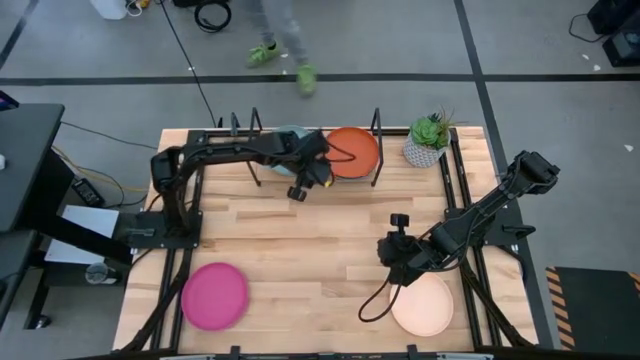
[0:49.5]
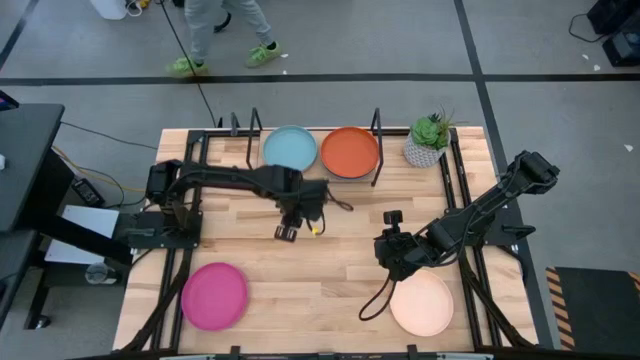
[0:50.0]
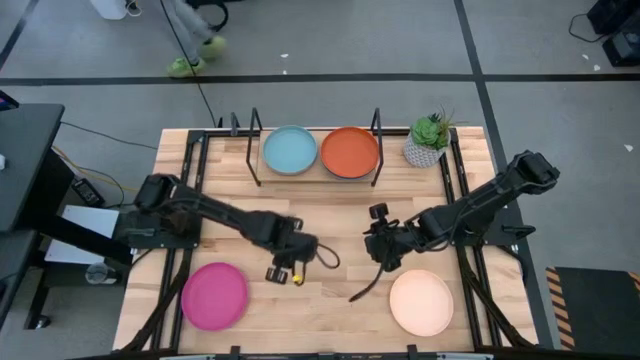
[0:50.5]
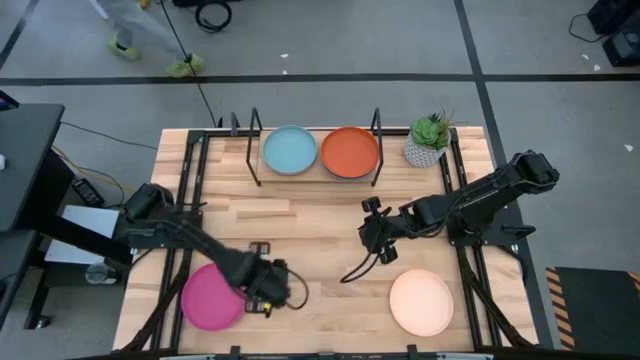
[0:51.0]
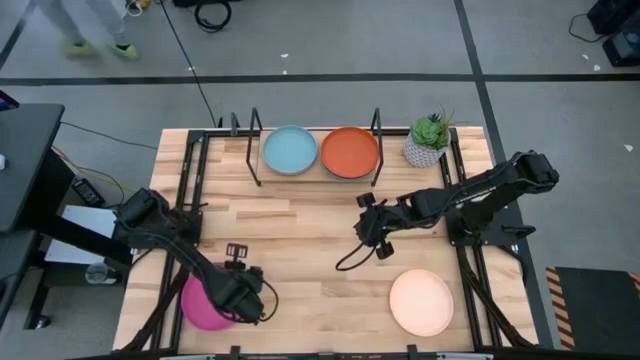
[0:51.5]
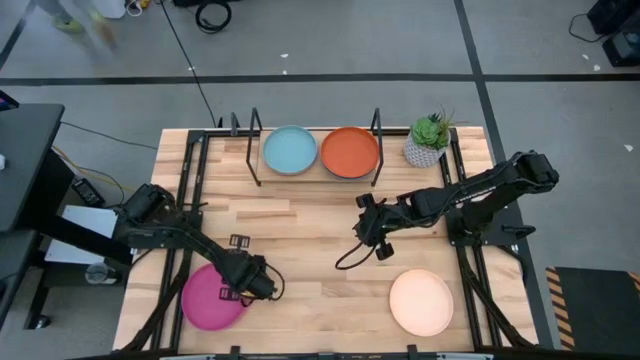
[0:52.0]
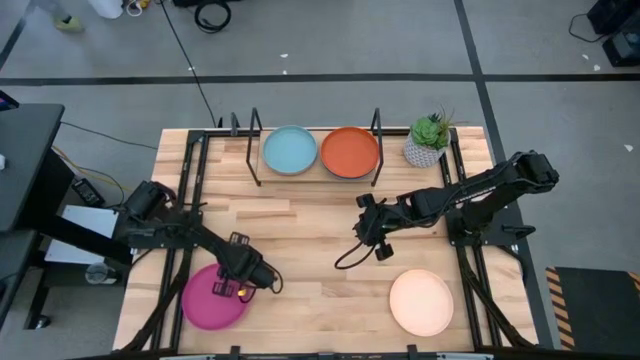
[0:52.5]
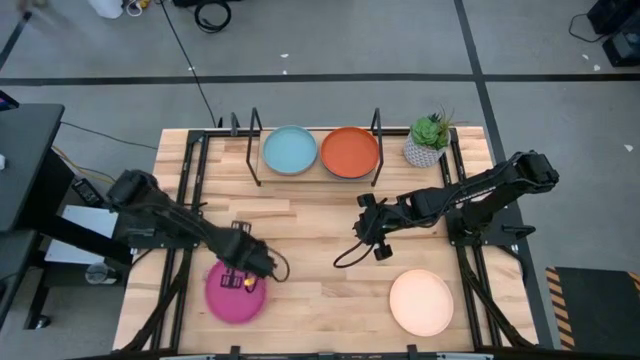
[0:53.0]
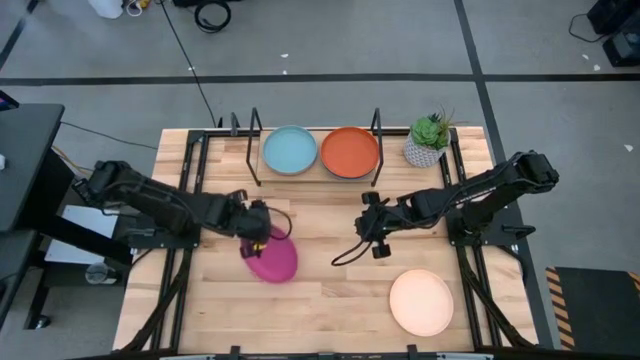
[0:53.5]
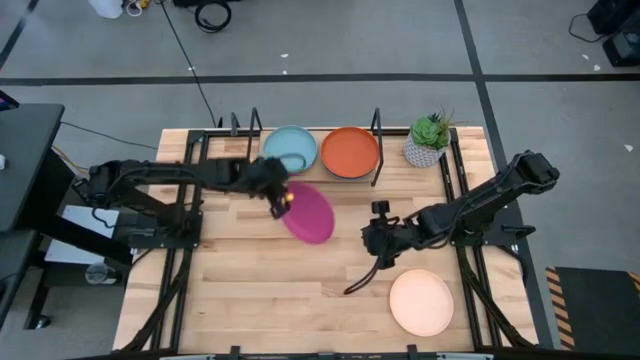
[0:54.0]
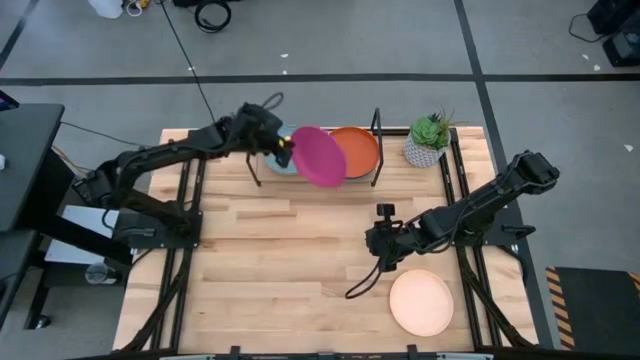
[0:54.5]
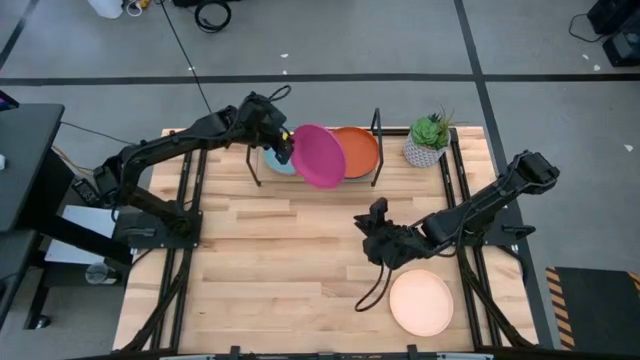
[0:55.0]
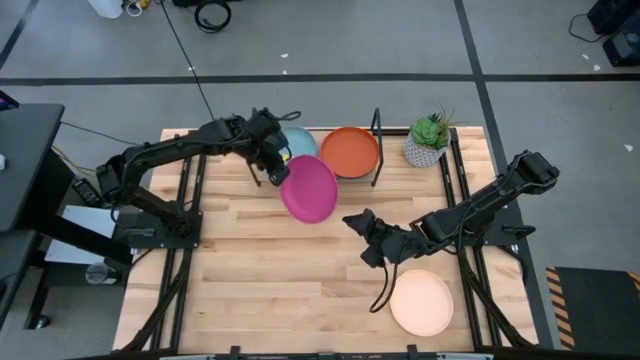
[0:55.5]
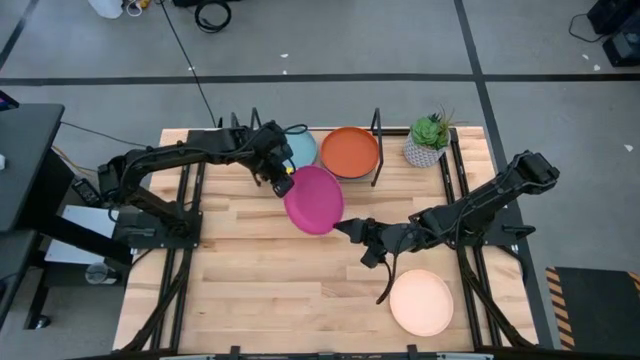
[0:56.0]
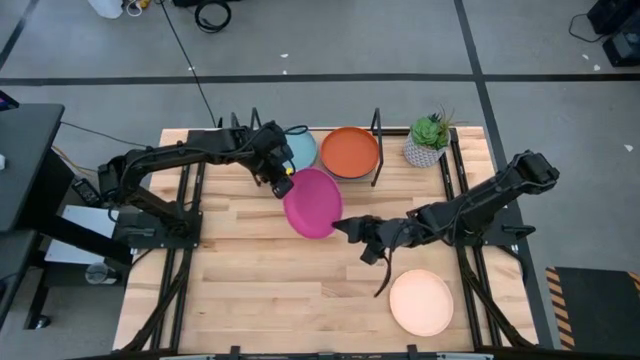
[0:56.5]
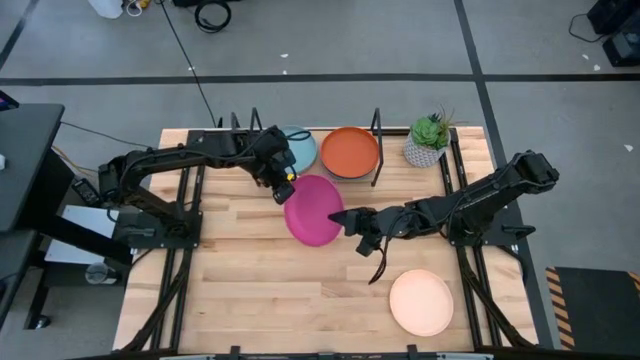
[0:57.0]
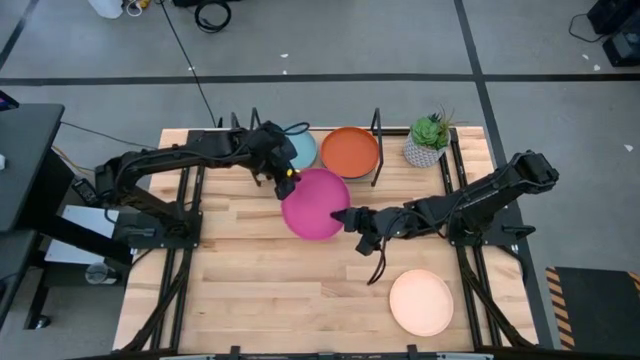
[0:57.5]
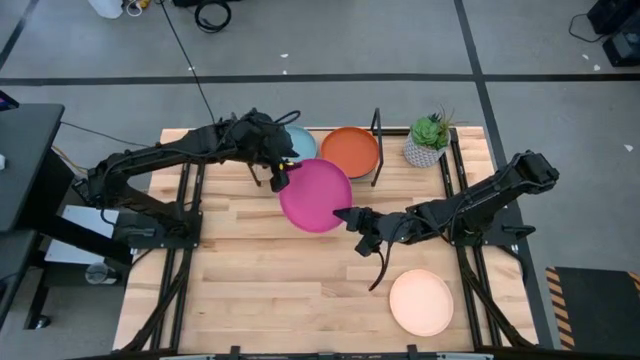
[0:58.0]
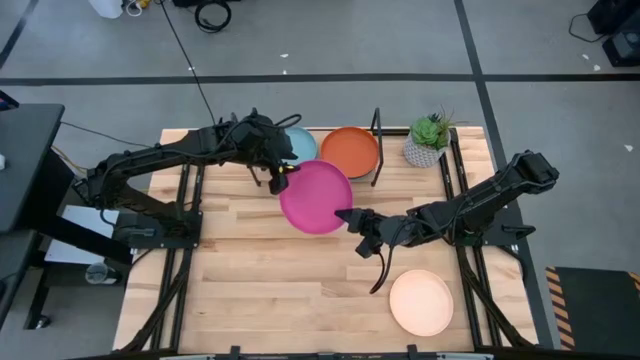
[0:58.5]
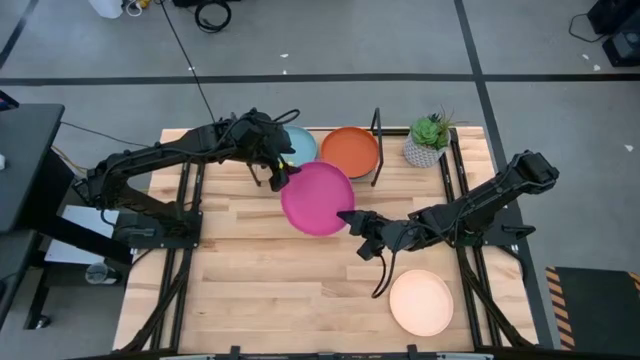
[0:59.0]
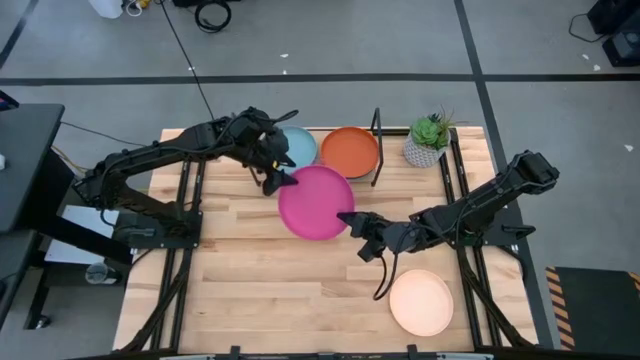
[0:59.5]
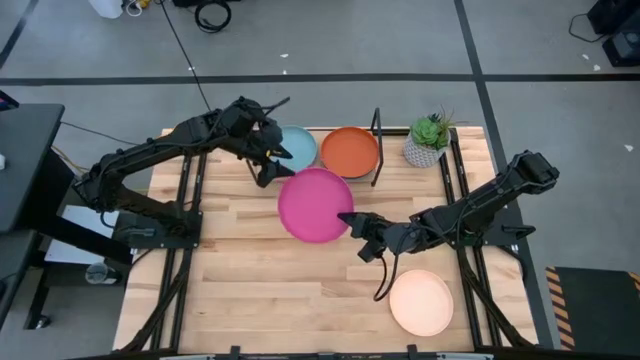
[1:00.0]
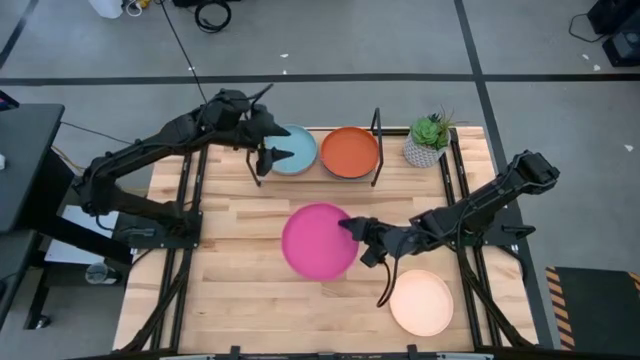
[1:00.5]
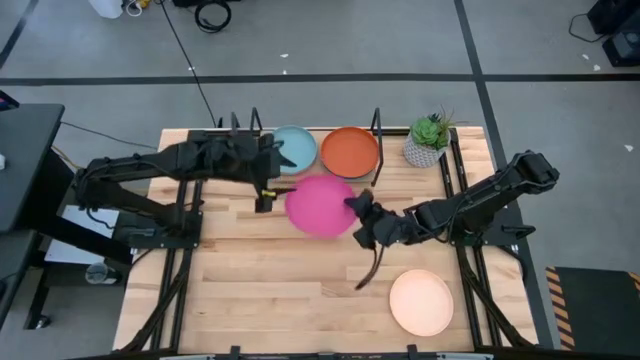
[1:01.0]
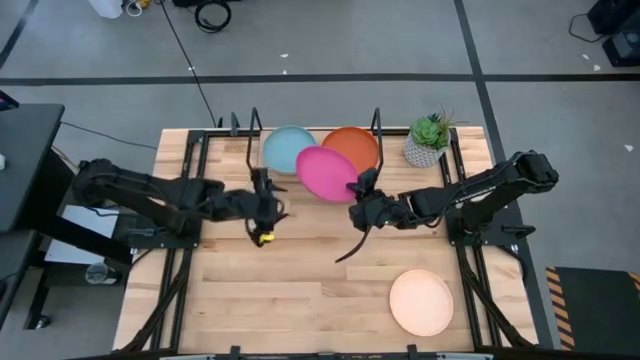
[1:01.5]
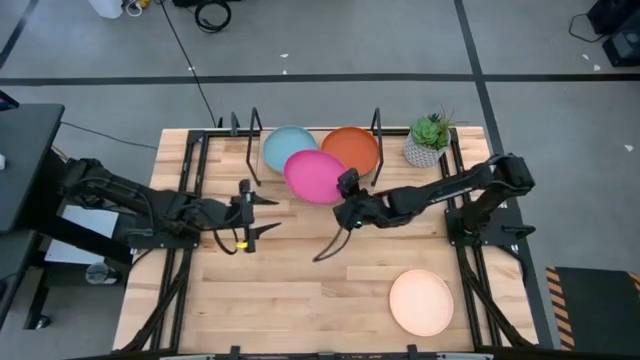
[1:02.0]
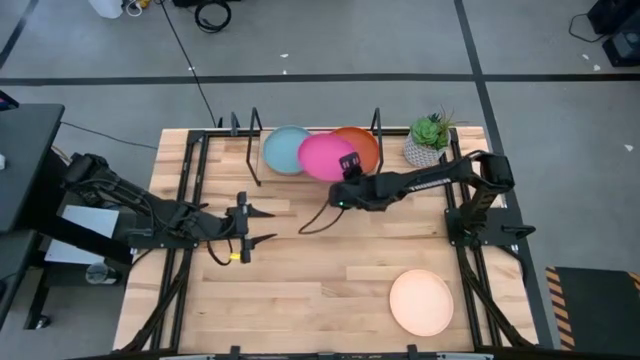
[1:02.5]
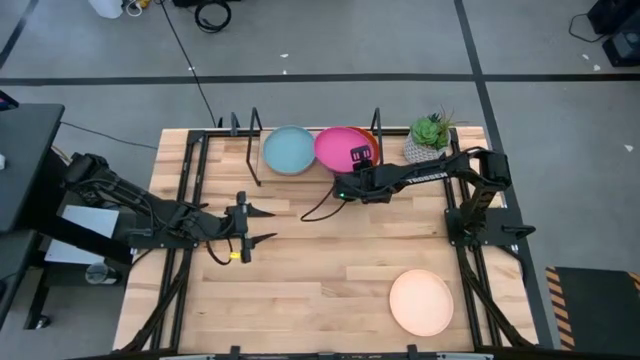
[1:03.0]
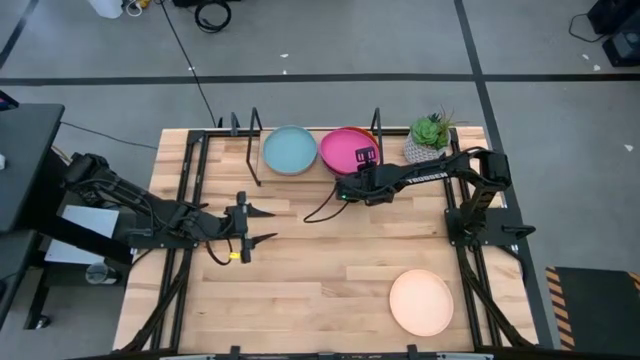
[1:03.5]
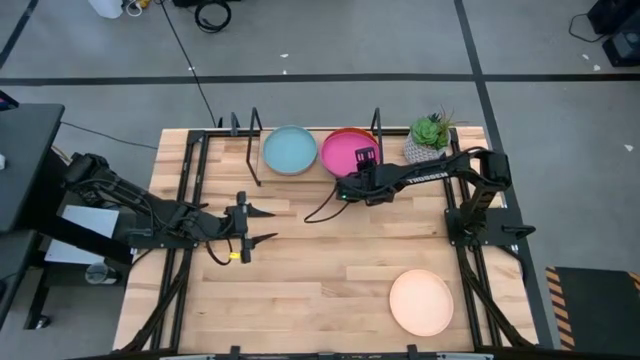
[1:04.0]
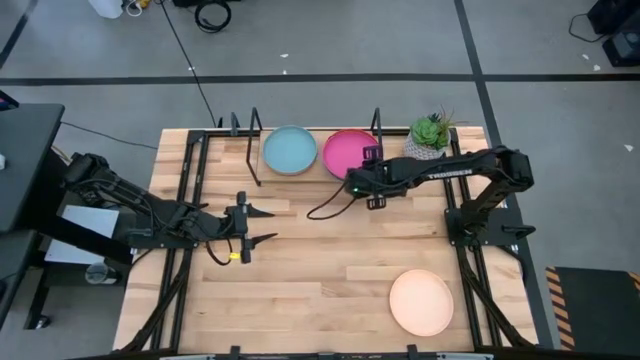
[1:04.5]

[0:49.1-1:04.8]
Task: Place and stack plates onto a shelf
Stack the pink plate on top of the orange plate on the shelf

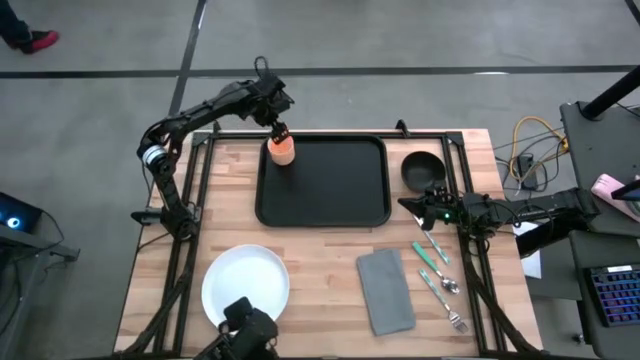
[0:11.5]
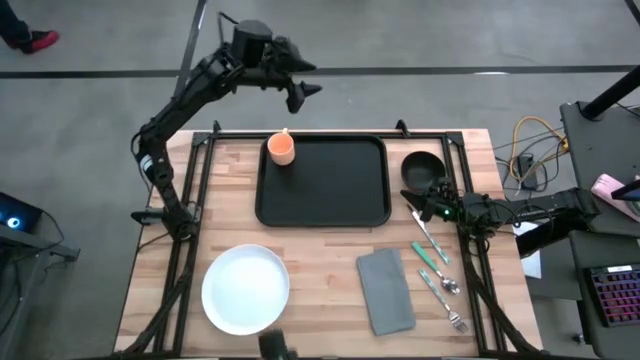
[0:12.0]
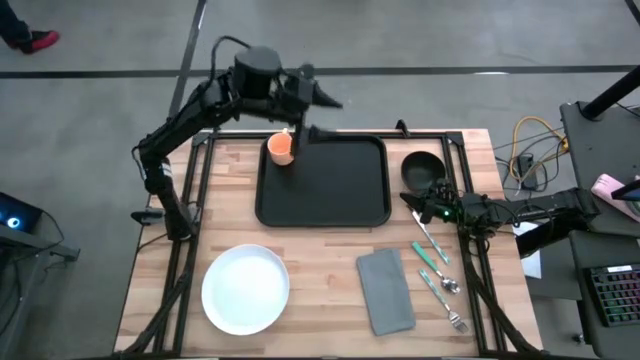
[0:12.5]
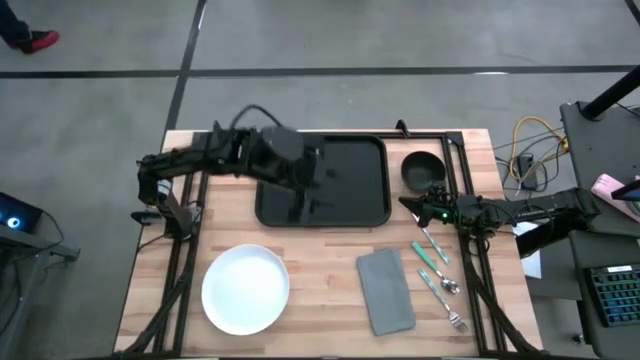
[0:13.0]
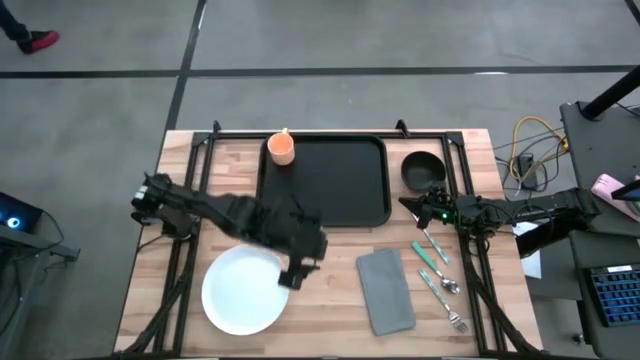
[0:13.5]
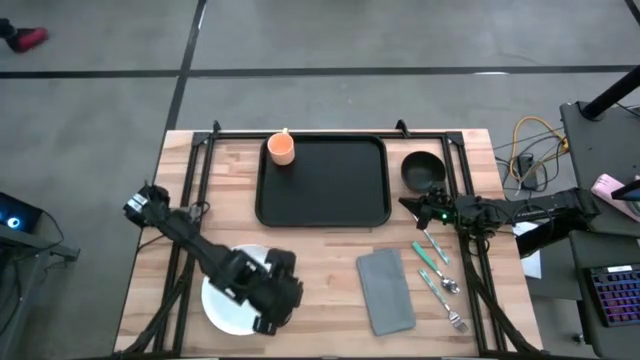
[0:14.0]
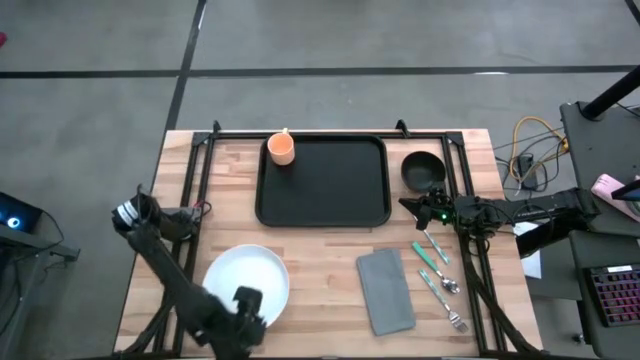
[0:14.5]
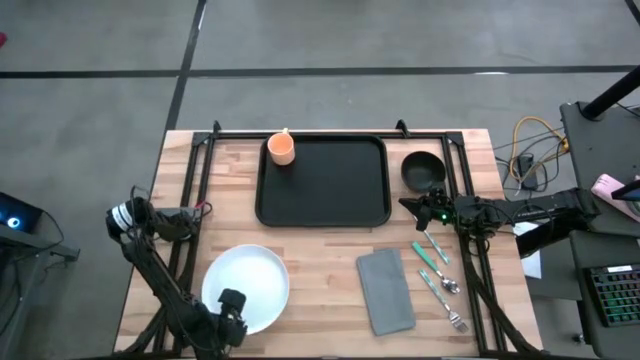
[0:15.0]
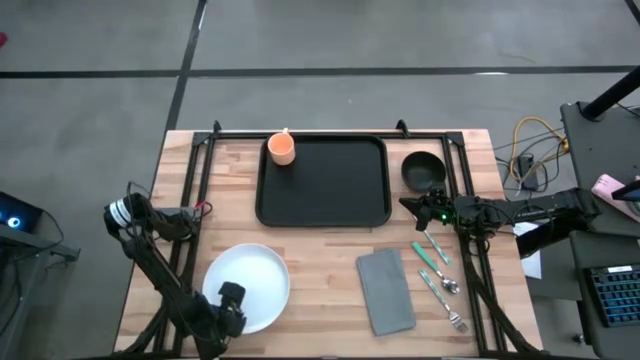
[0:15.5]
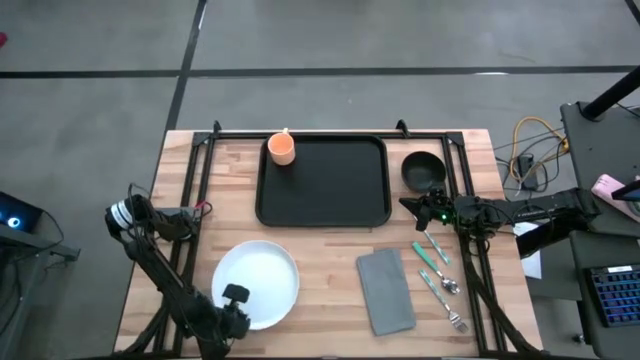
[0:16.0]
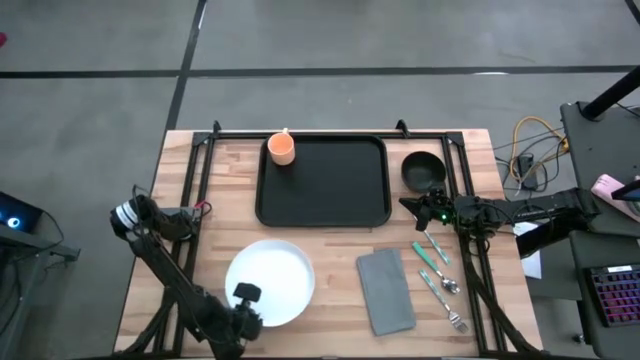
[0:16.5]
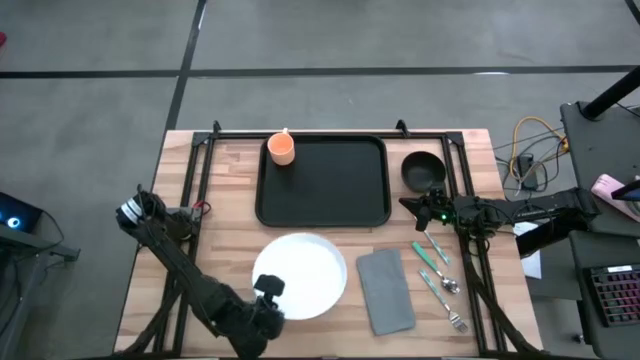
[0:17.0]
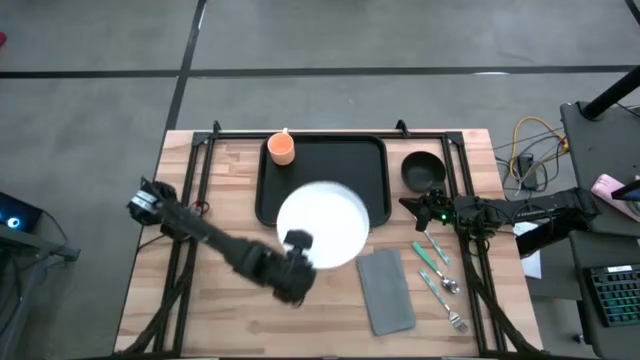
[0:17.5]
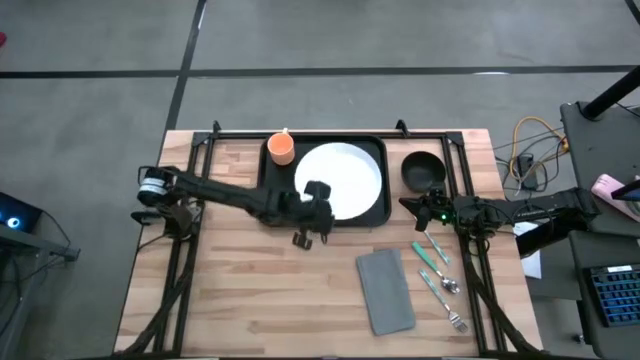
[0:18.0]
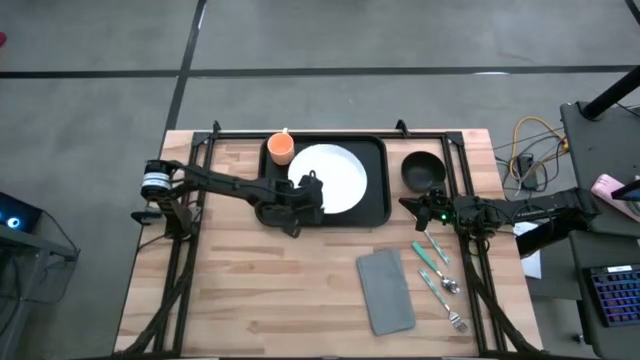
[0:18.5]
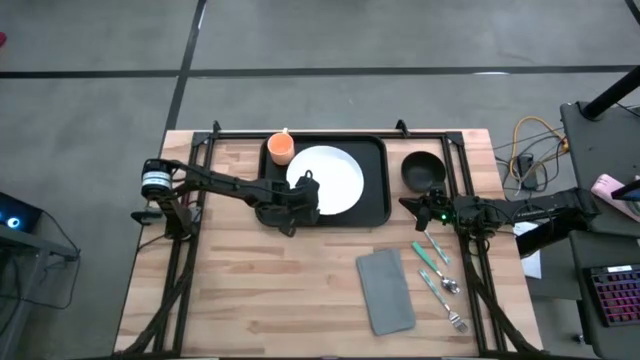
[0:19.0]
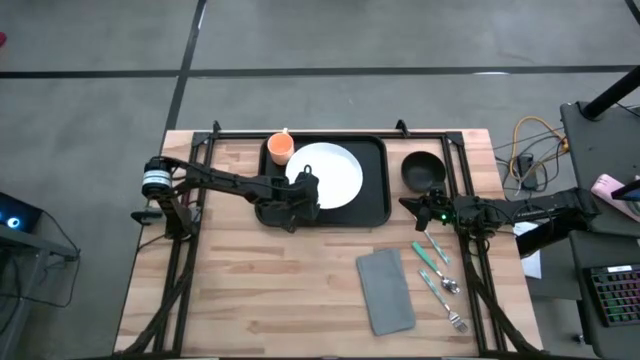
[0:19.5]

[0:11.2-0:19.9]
Task: Set up tray
Put the white plate on the black serving tray to the bottom right of the light orange mug
